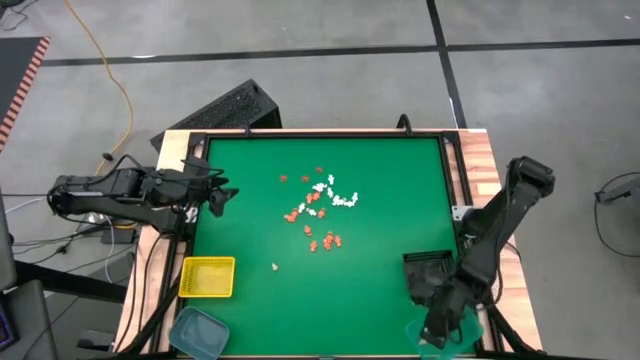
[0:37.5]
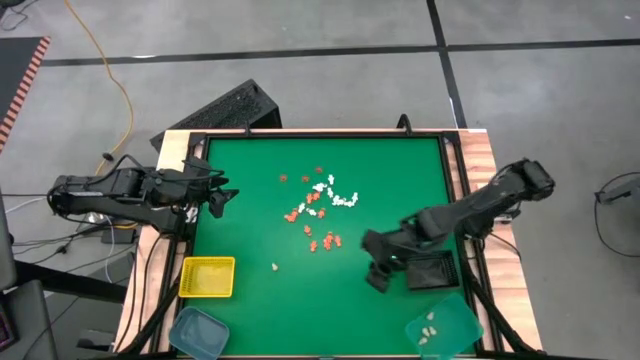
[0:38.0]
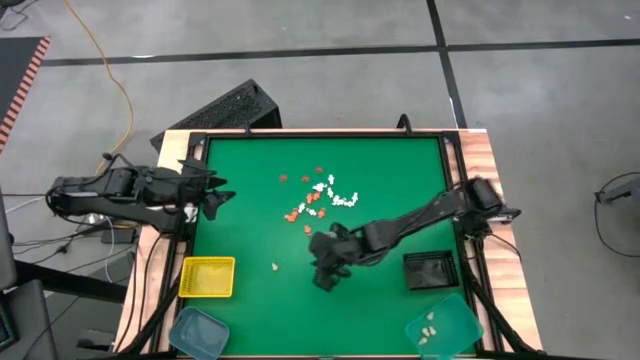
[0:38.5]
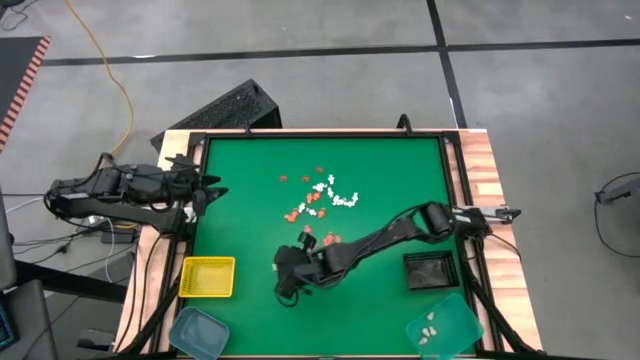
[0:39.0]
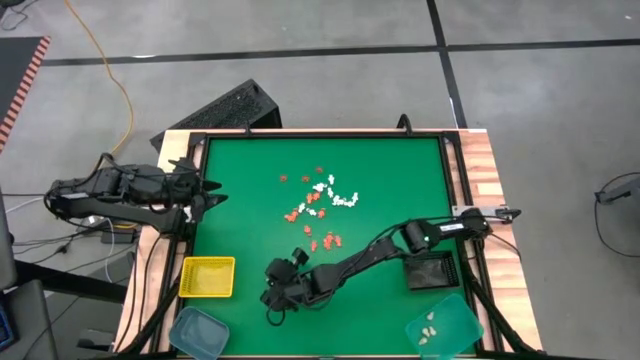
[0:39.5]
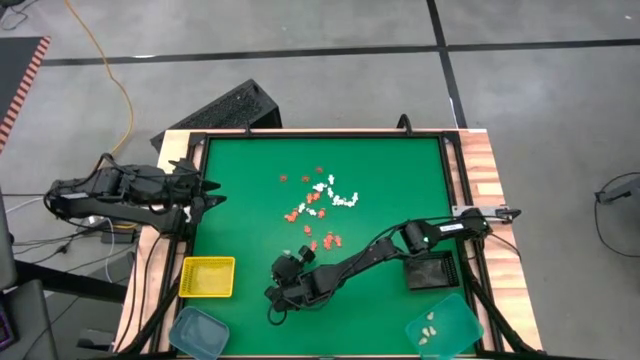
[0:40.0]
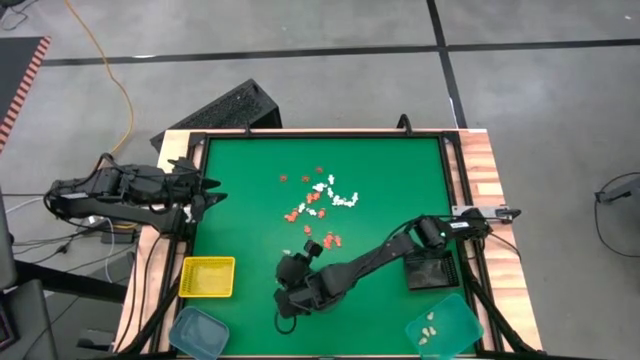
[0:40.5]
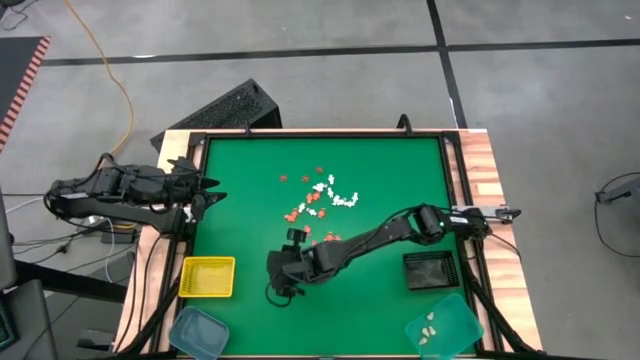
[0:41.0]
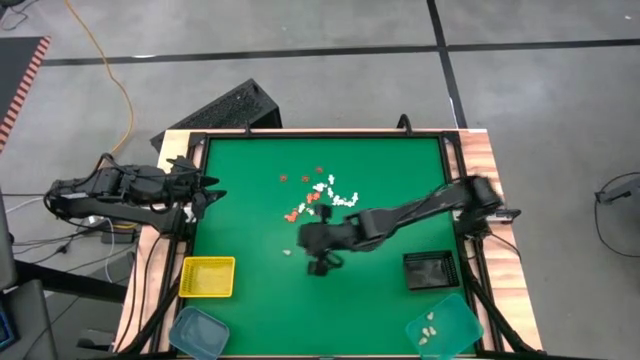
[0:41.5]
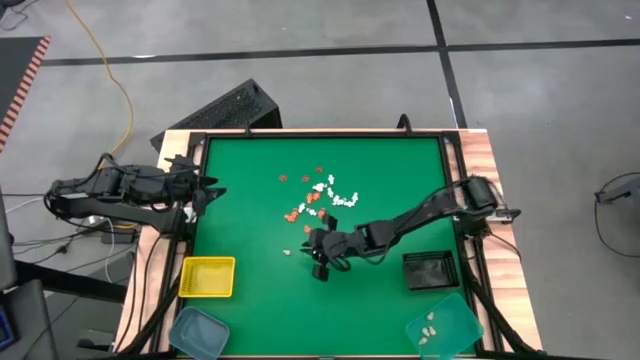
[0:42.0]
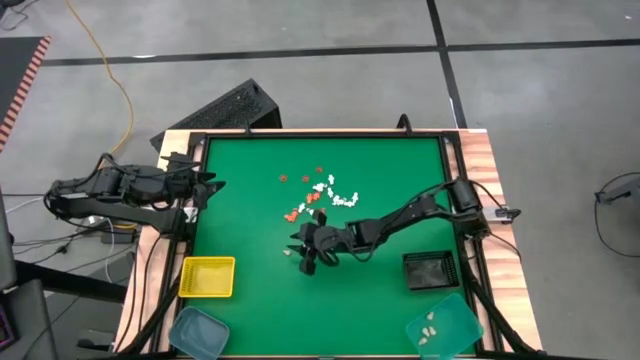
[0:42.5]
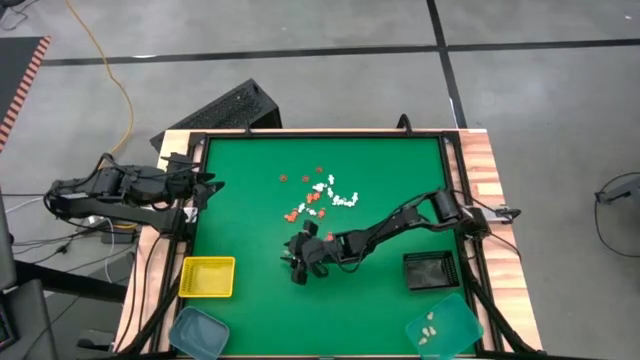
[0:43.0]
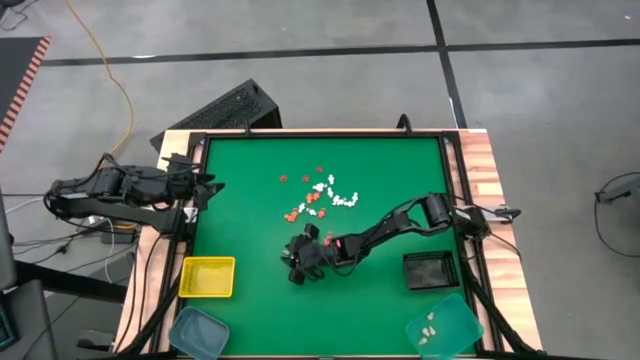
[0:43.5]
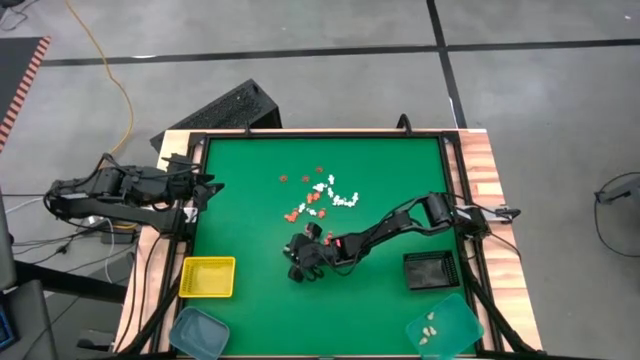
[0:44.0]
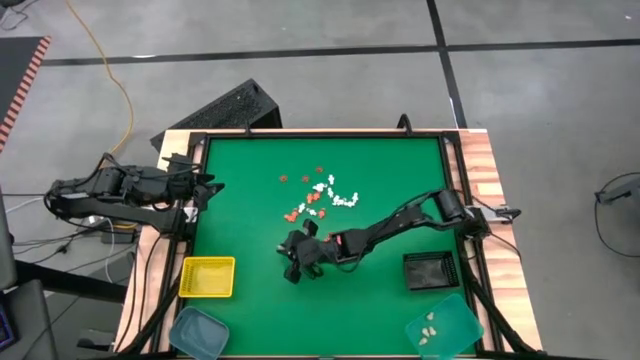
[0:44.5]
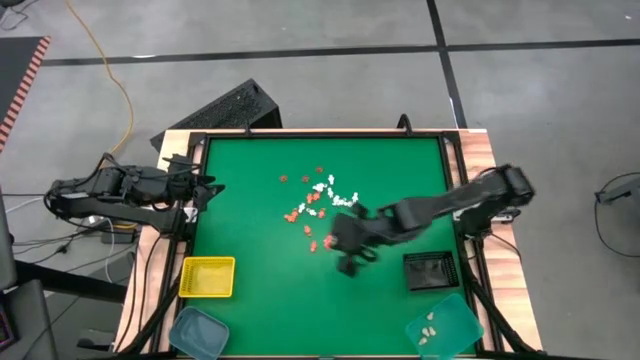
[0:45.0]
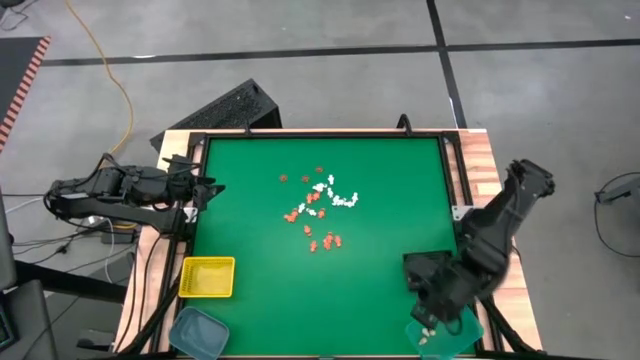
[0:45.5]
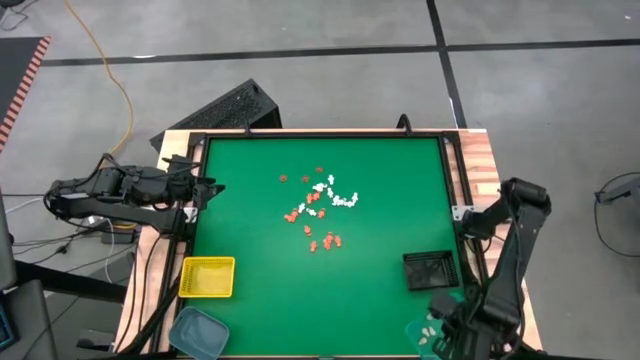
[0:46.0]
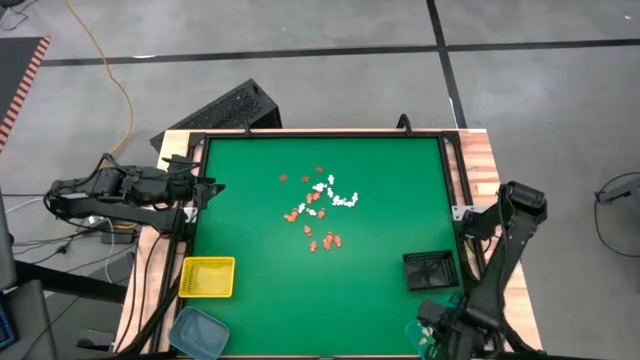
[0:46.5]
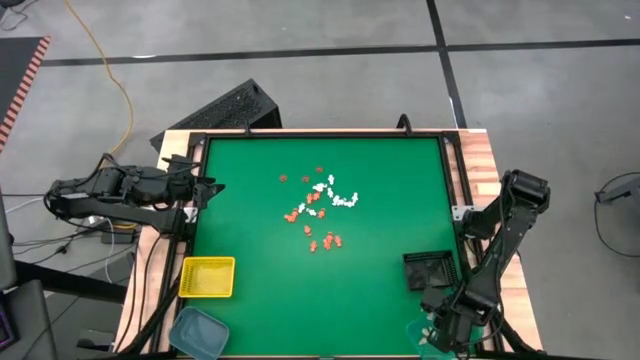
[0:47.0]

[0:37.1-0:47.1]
Task: Sort Halloween decoration
Put the skull model into the green bin

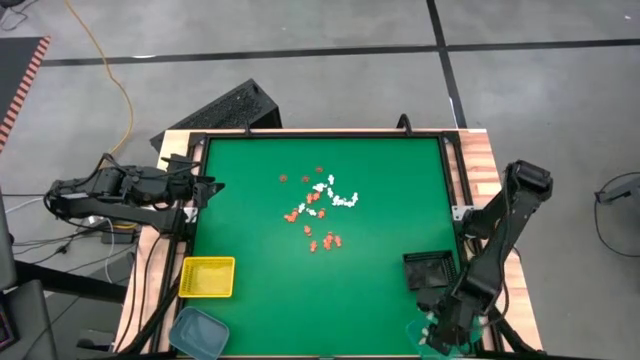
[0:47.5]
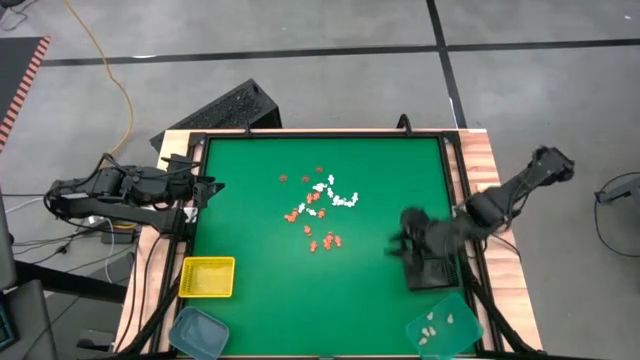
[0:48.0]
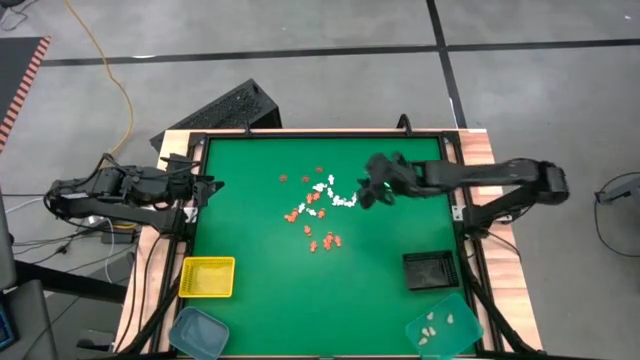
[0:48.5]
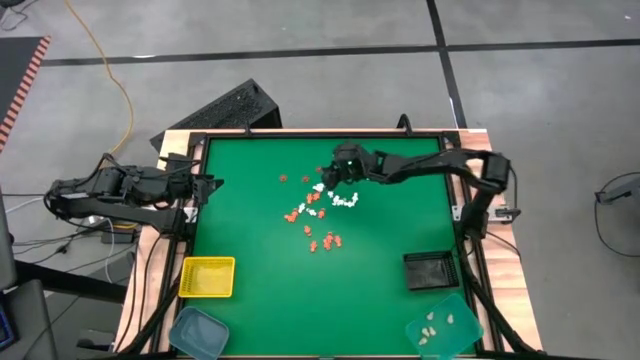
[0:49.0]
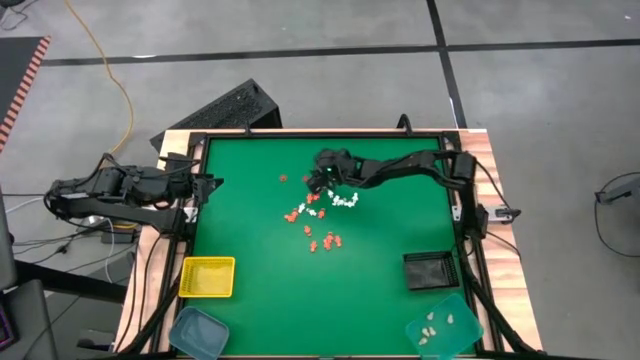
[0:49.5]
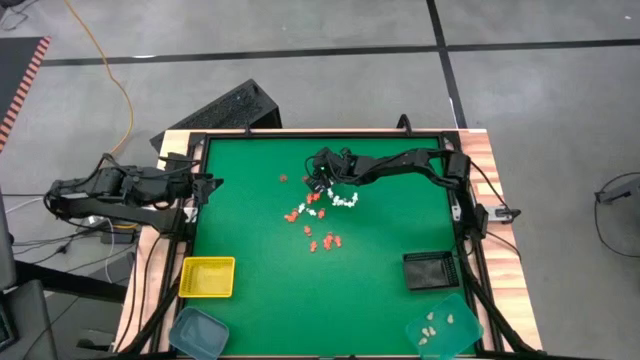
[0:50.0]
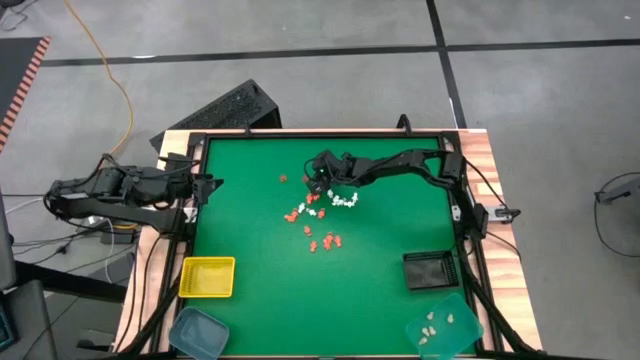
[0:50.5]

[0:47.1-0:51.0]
Put the orange pumpkin toy into the black bin

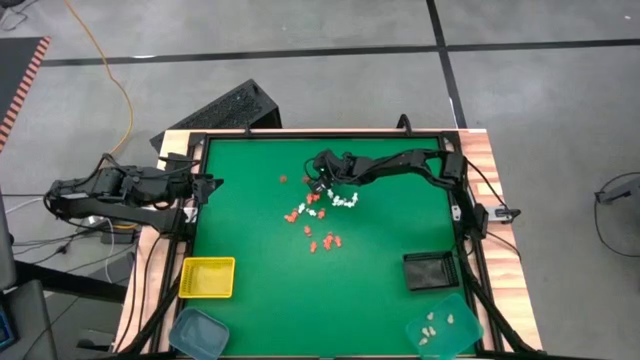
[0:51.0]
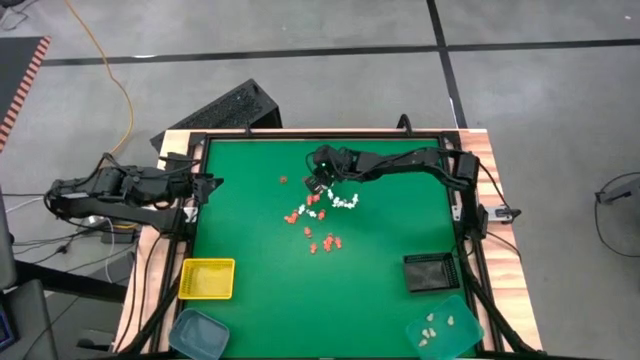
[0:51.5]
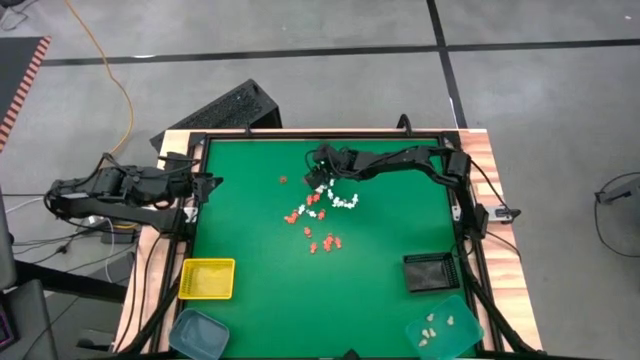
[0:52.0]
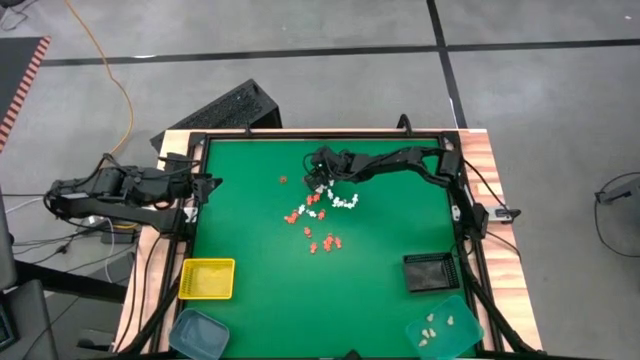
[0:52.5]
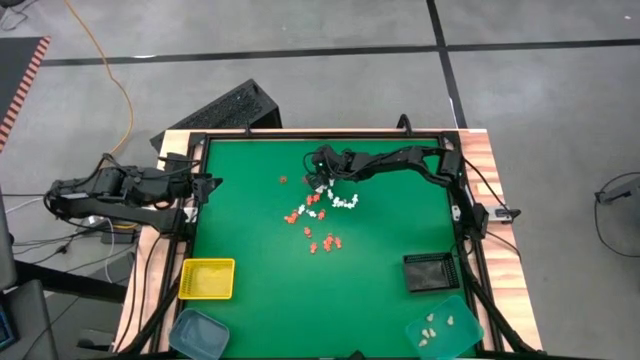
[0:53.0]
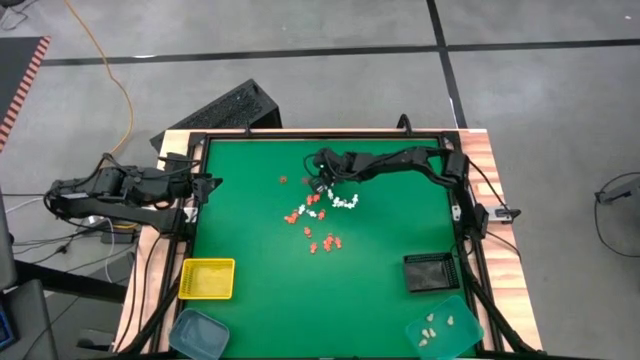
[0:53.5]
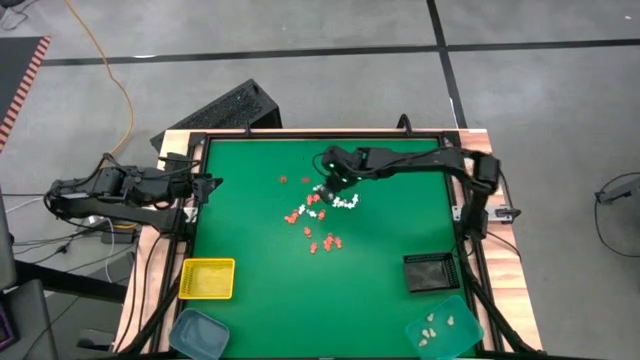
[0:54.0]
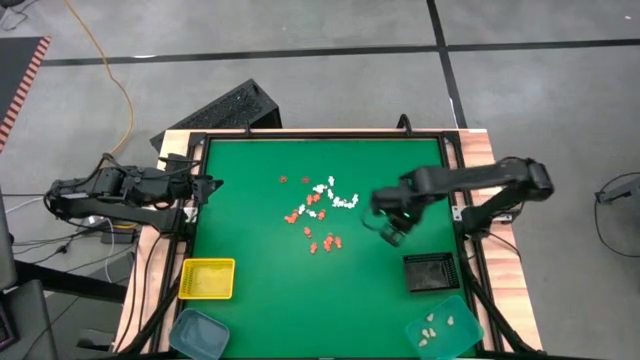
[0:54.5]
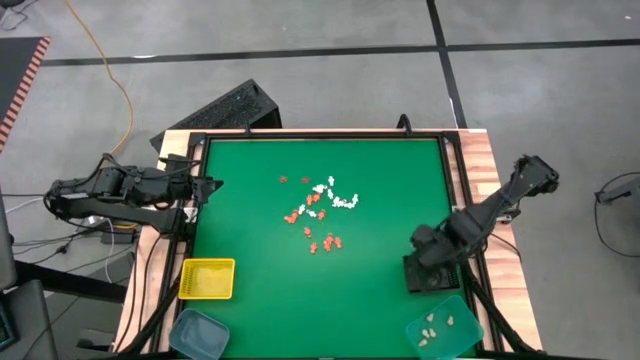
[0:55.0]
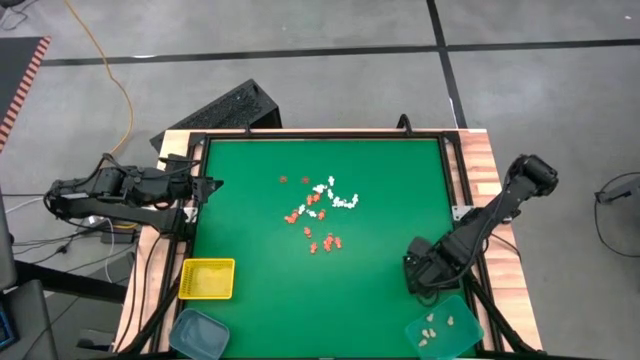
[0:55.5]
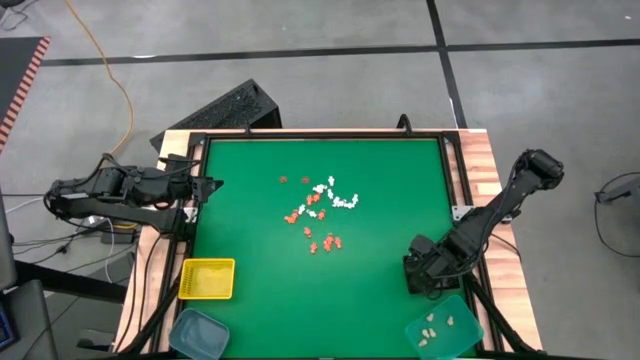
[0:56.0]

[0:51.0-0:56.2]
Put the orange pumpkin toy into the black bin

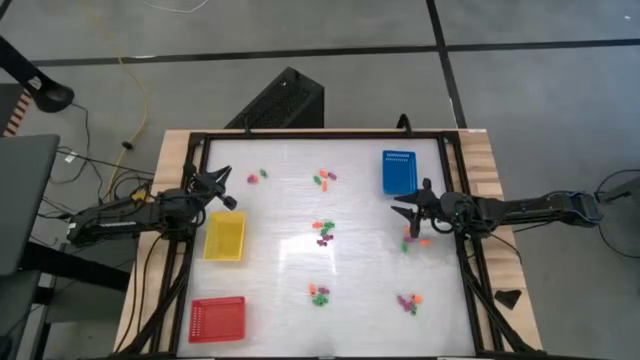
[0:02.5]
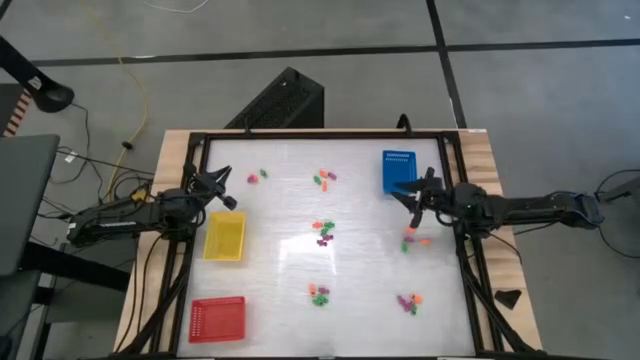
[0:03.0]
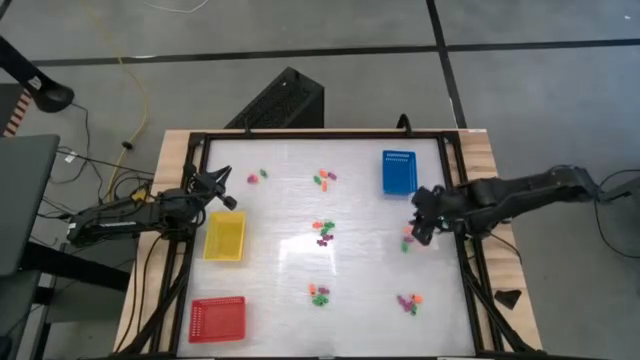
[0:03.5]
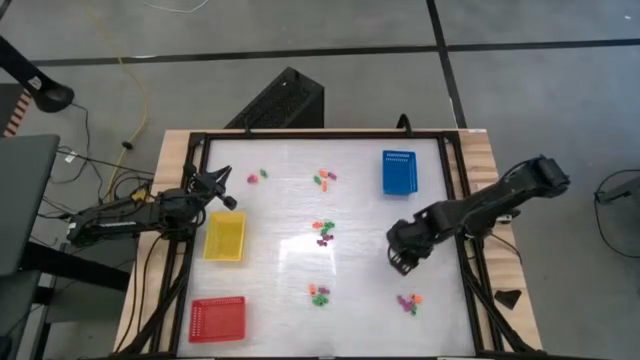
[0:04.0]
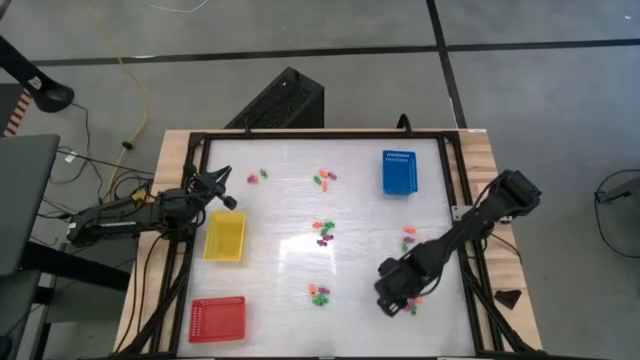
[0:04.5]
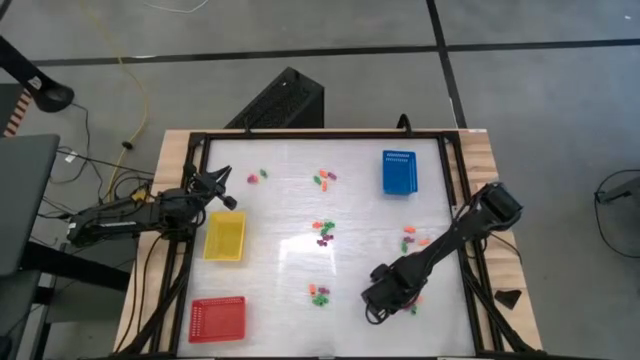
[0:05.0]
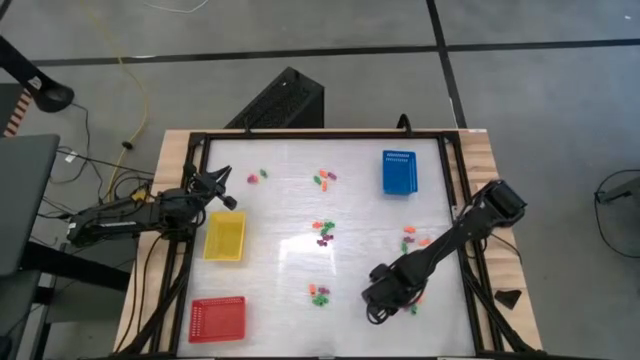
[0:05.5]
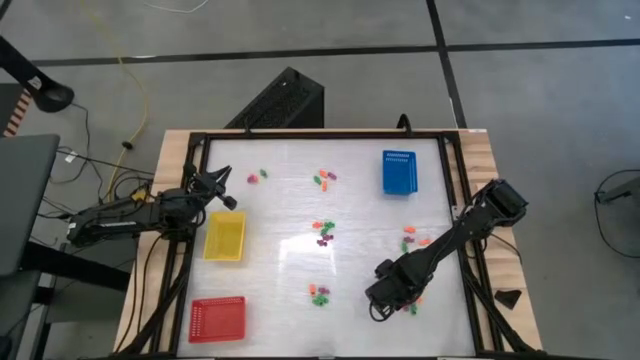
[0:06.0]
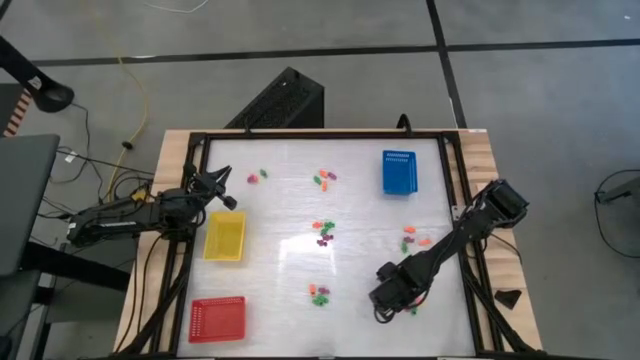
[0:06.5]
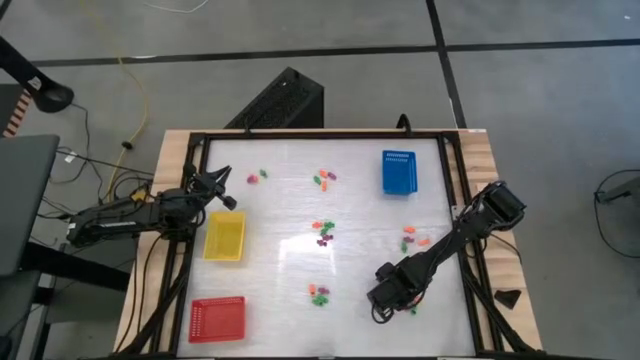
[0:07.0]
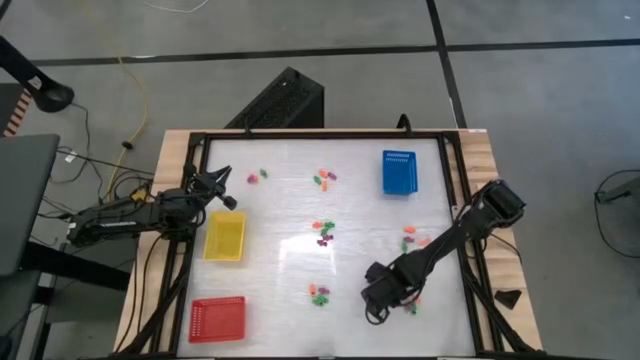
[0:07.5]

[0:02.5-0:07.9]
Task: Sort Halloween decoration
Put the purple skeleton toy into the blue bin
